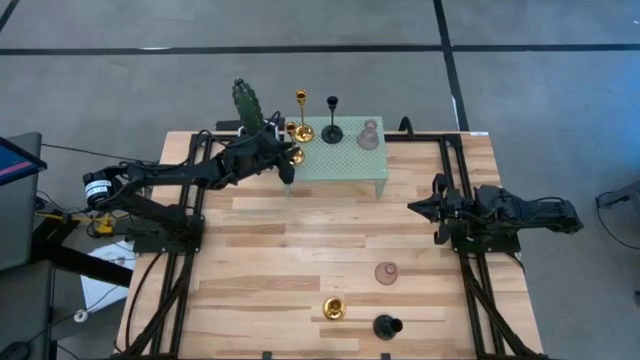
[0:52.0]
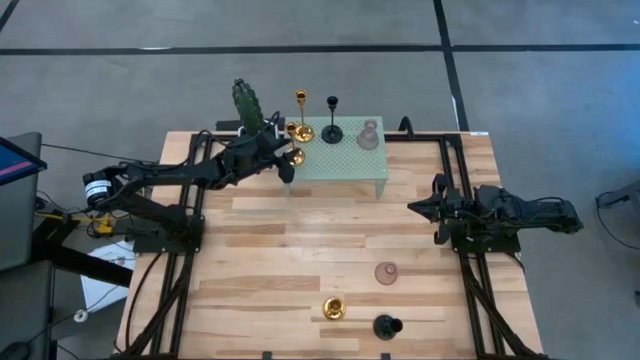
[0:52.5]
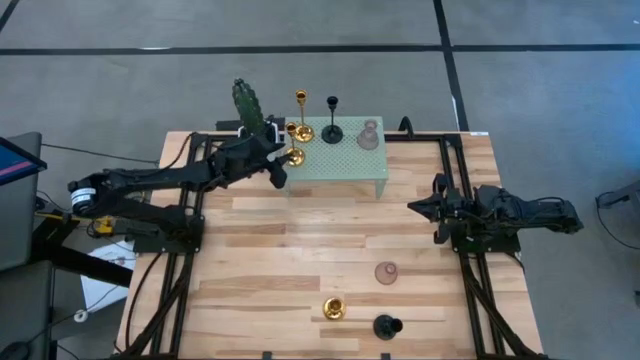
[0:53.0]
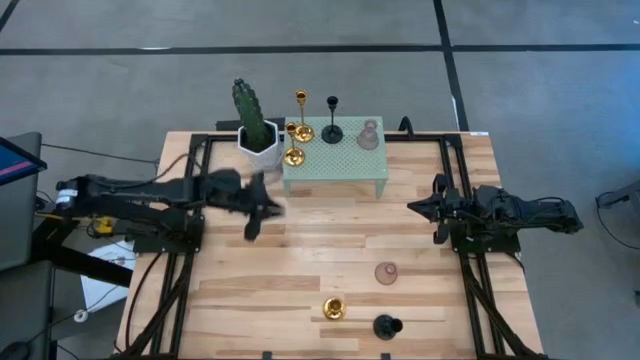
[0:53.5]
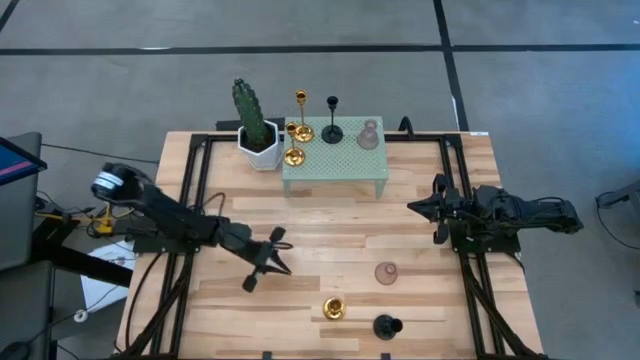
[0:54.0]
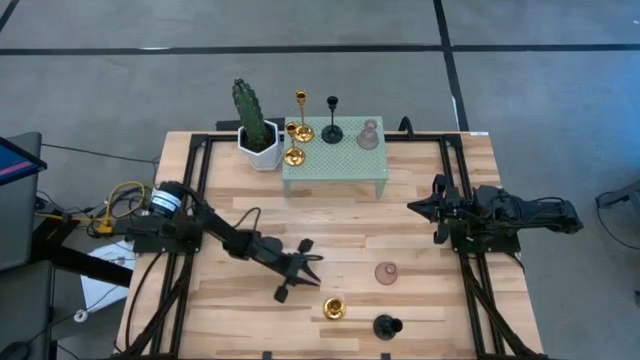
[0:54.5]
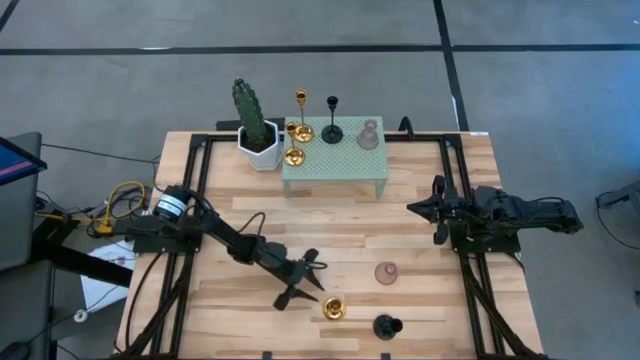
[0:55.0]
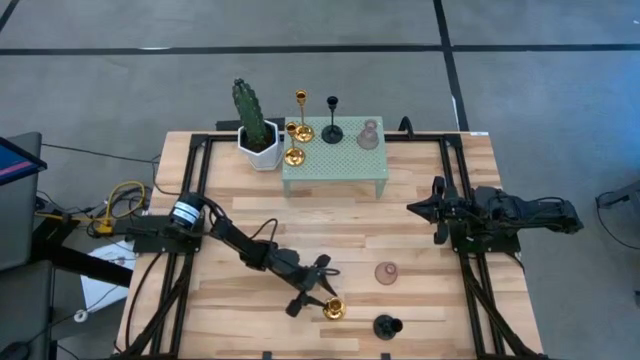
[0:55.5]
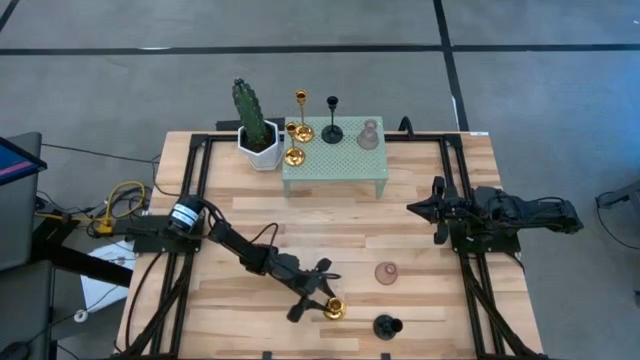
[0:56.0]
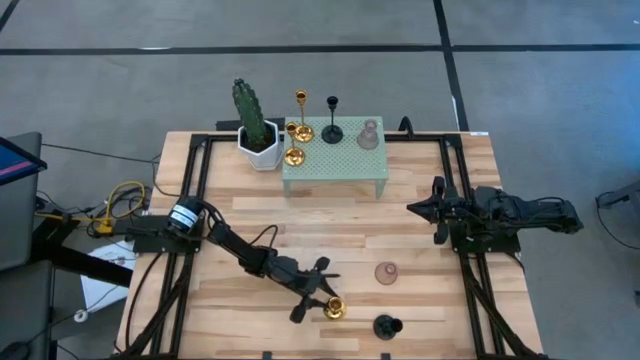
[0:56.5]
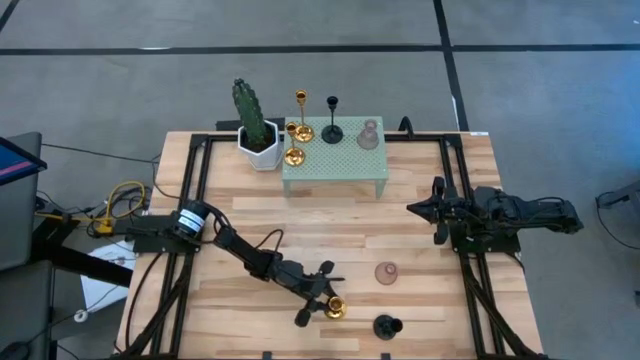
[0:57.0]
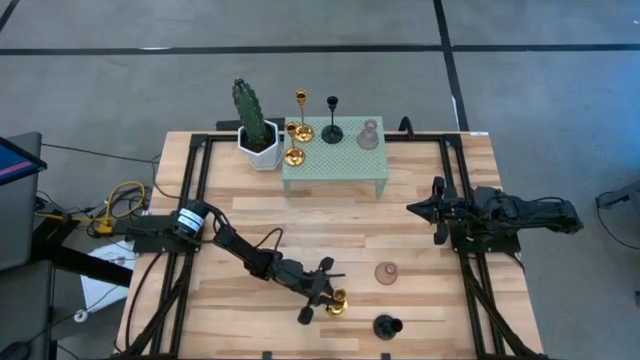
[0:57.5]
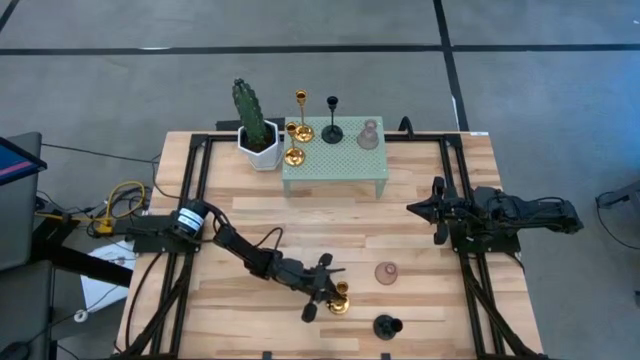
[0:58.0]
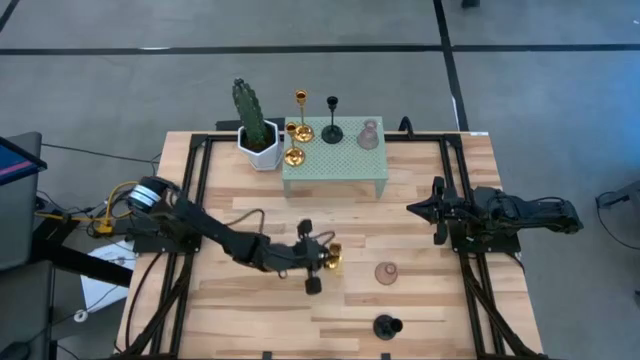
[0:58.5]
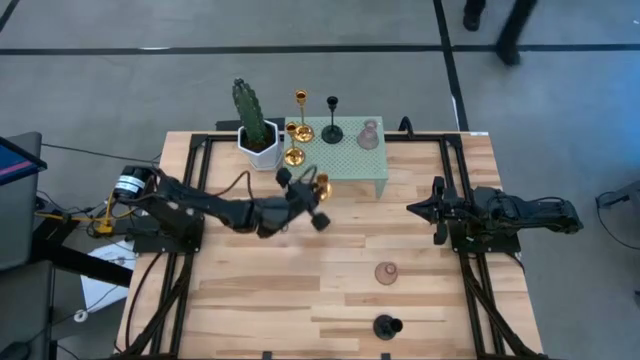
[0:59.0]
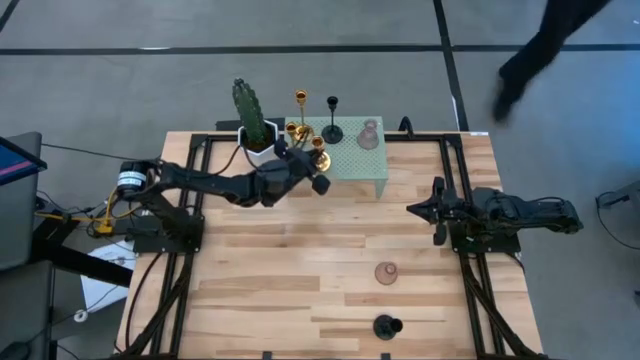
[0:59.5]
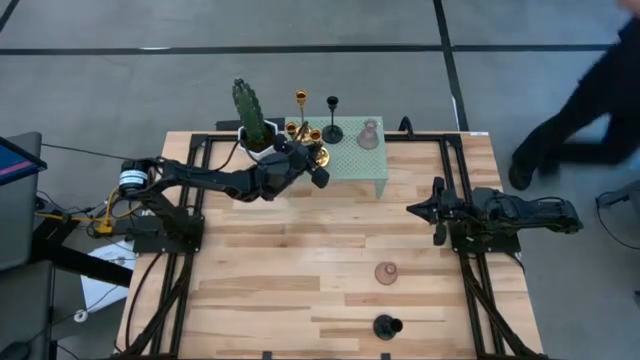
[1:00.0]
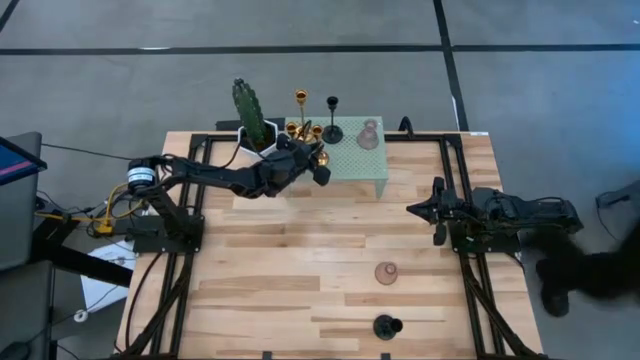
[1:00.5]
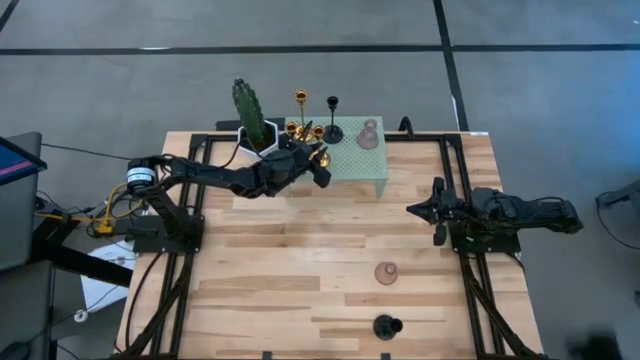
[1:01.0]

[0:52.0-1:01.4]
Task: Pick & Place candle stick holders
Put the gold candle holder on the shelf

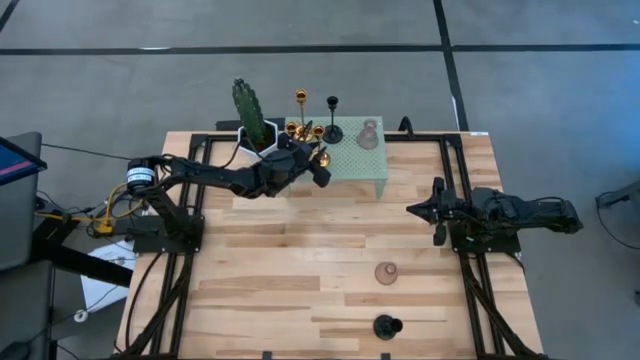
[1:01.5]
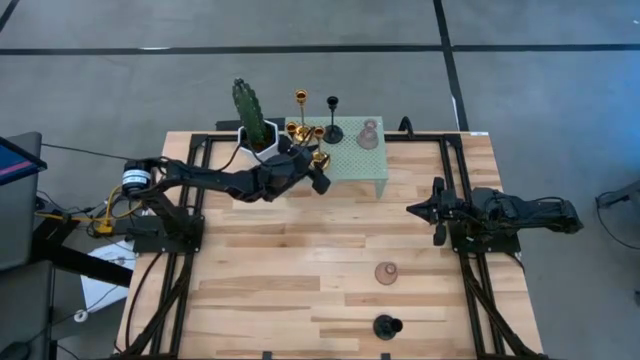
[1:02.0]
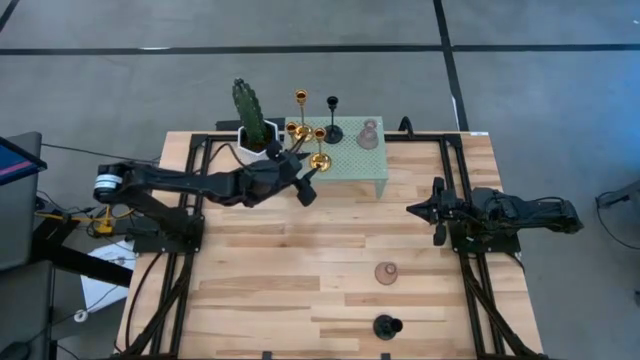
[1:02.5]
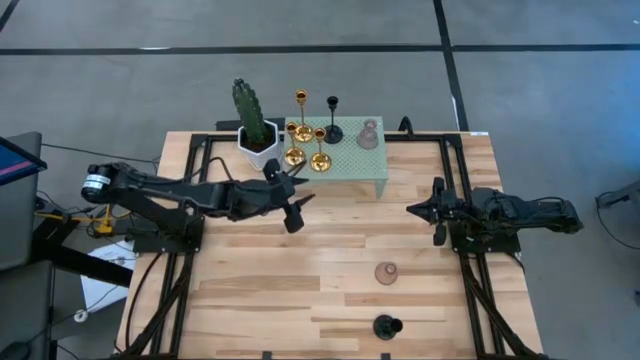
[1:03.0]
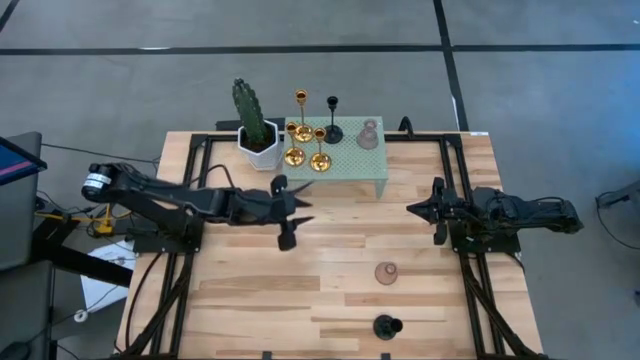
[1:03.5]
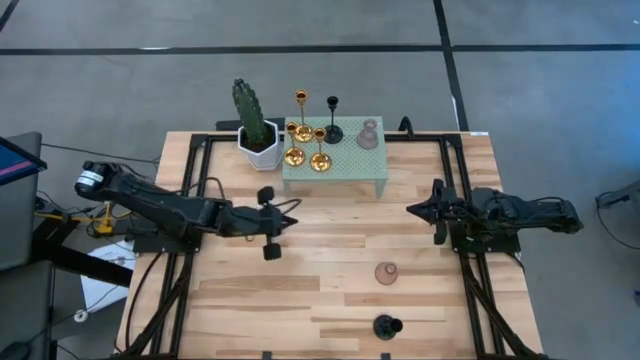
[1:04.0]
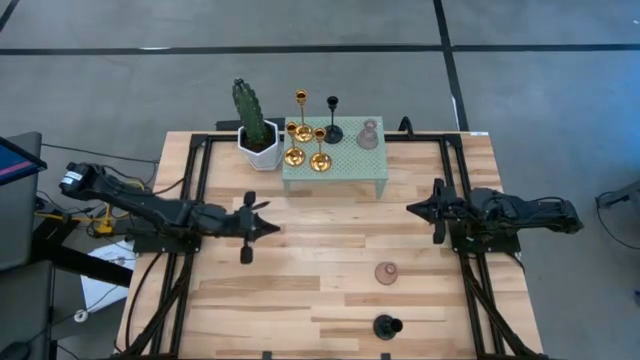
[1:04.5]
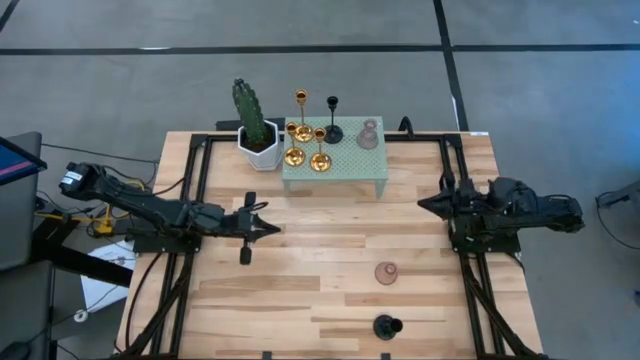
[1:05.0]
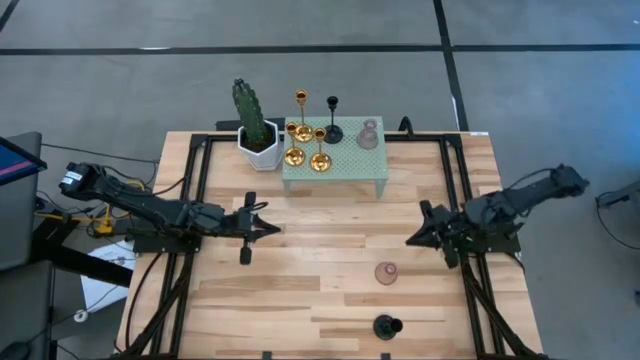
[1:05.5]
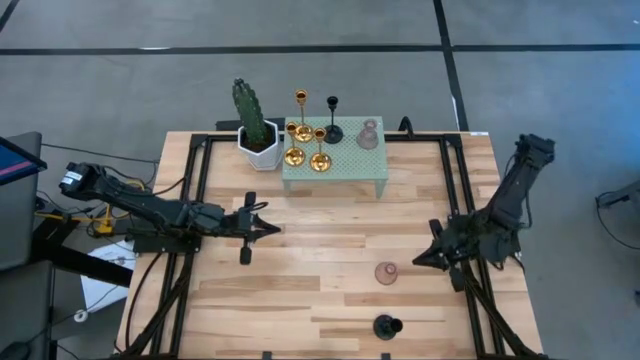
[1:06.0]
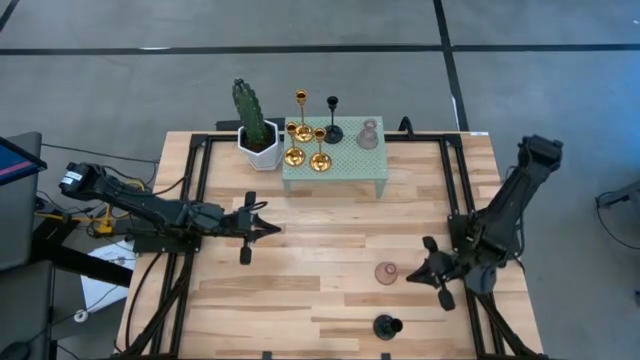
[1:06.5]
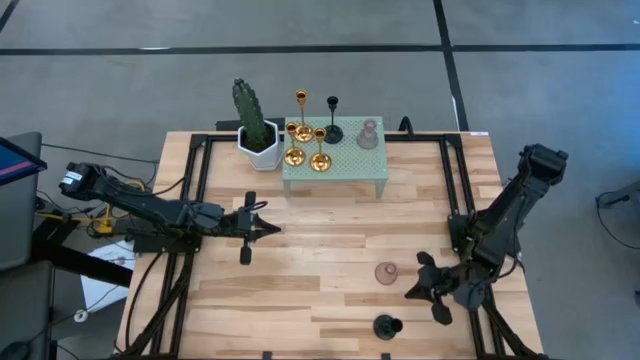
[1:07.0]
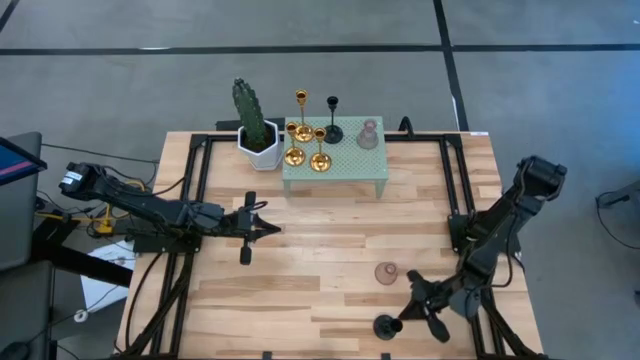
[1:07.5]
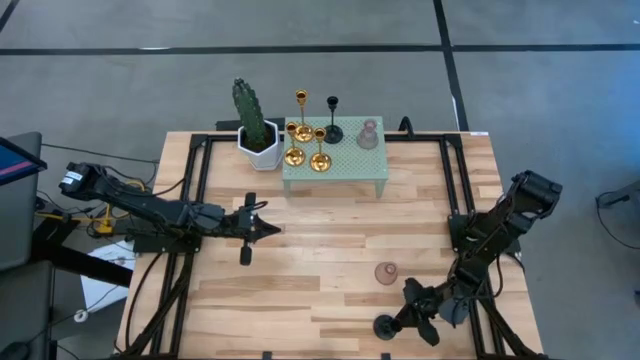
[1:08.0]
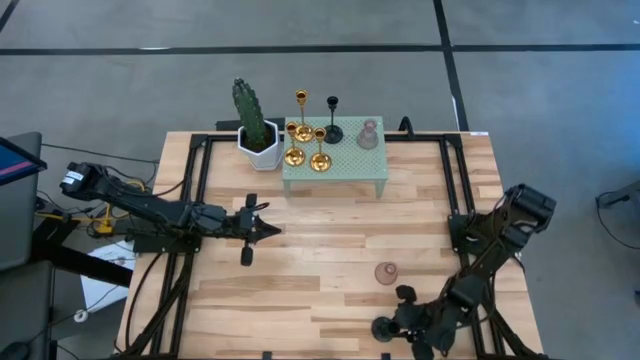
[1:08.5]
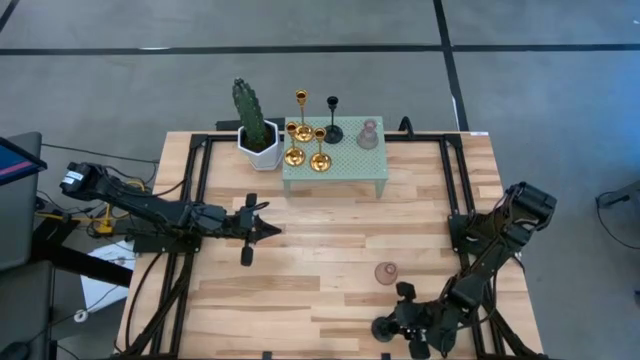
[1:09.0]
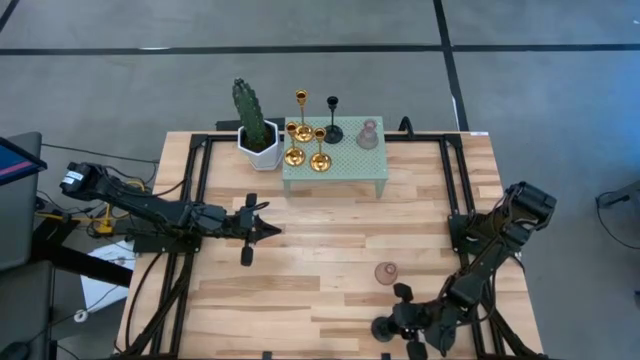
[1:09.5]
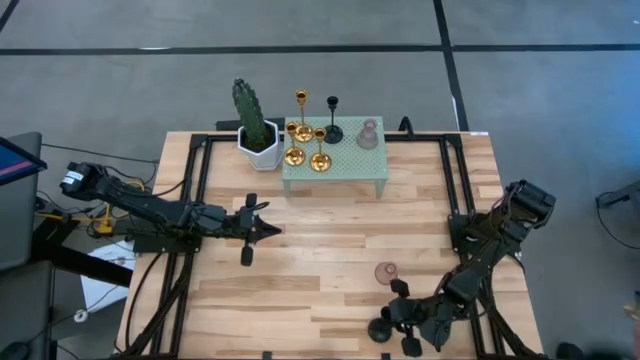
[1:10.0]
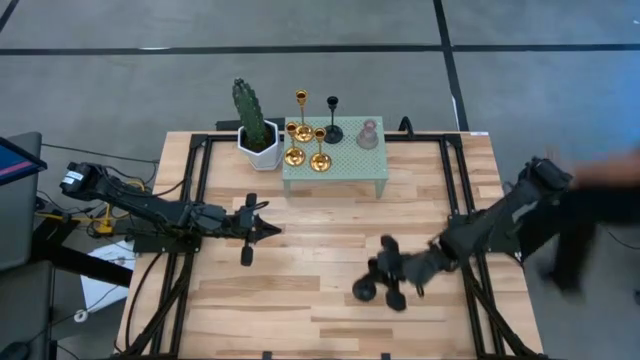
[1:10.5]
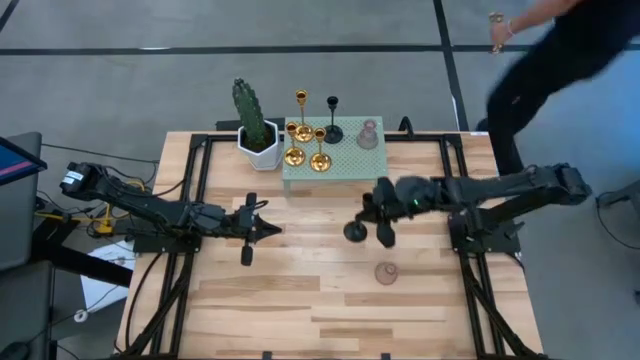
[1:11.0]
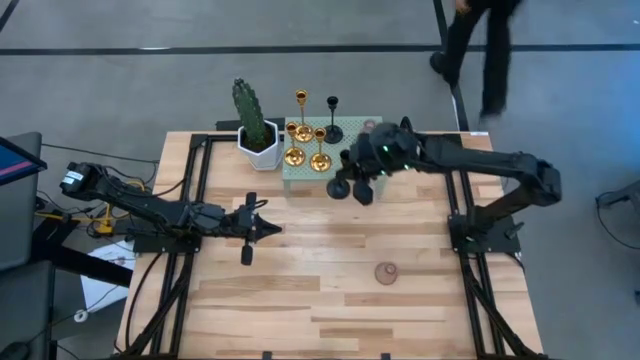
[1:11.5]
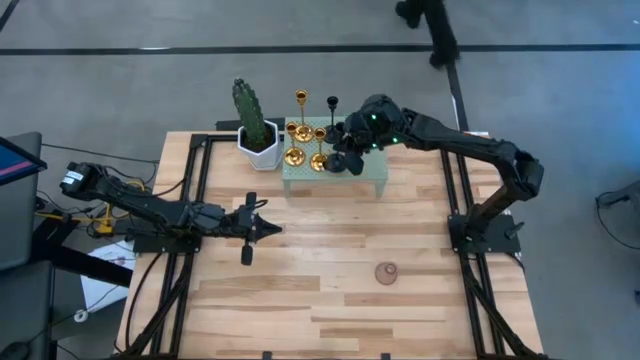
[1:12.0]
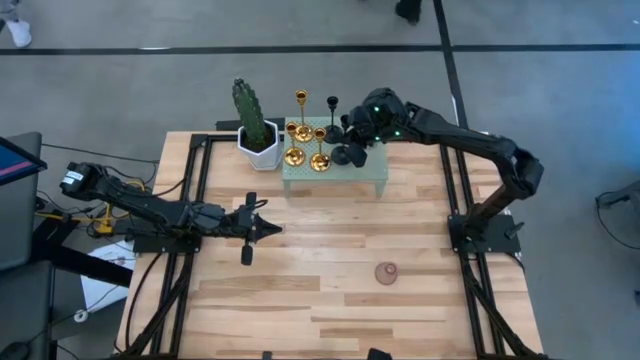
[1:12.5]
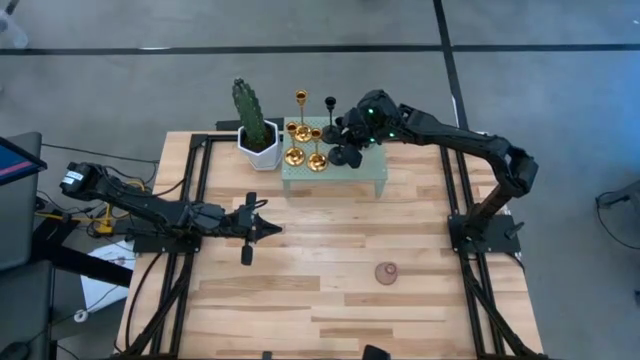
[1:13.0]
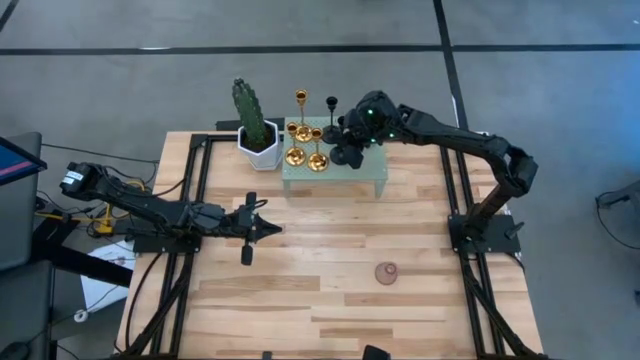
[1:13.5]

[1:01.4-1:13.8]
Put the black candle holder on the shelf
